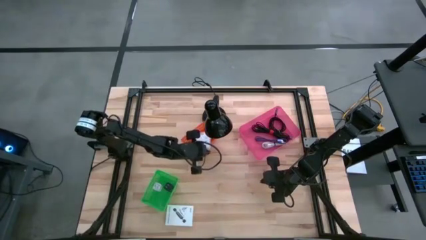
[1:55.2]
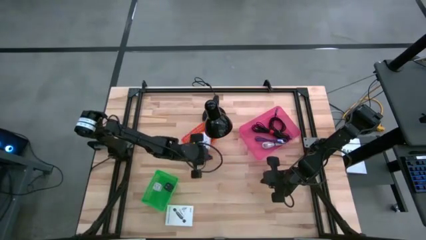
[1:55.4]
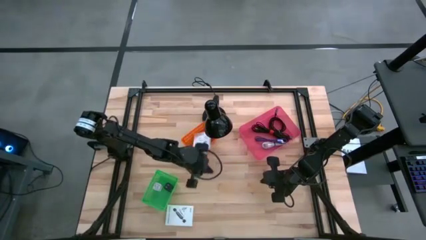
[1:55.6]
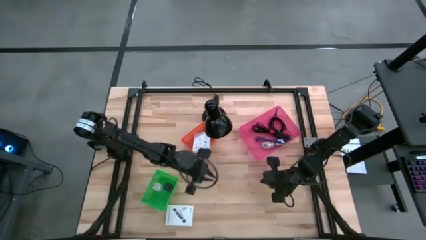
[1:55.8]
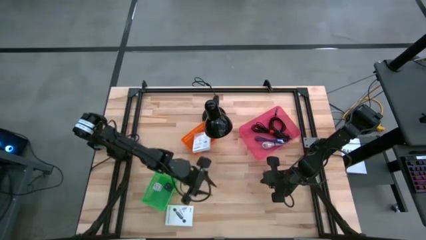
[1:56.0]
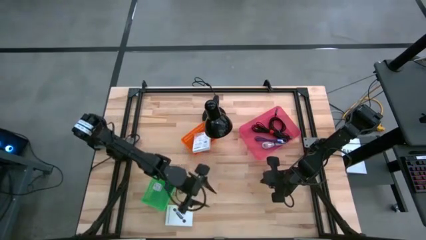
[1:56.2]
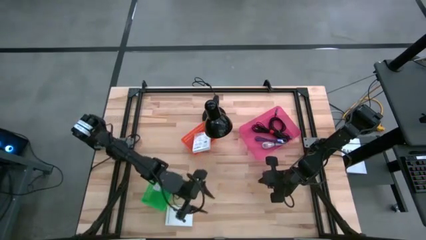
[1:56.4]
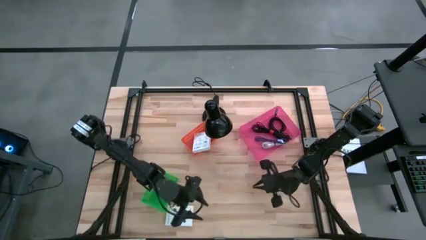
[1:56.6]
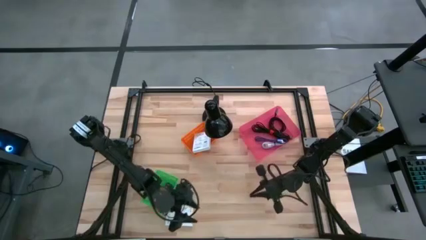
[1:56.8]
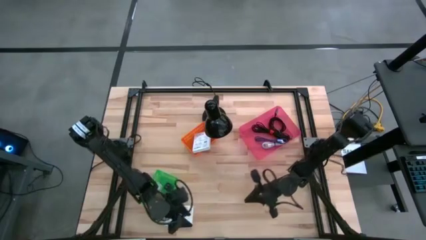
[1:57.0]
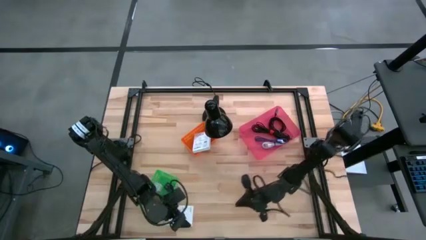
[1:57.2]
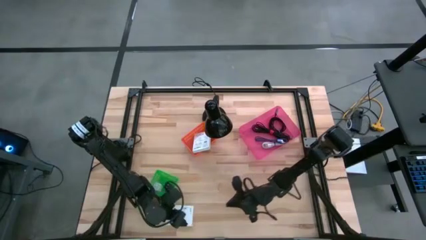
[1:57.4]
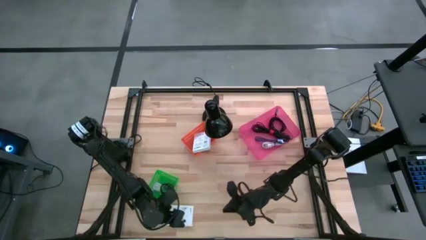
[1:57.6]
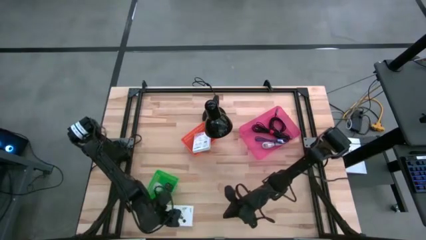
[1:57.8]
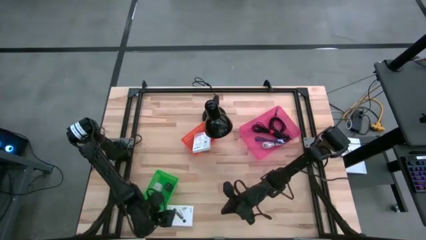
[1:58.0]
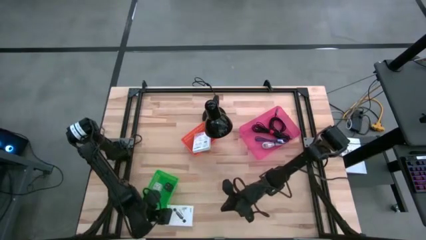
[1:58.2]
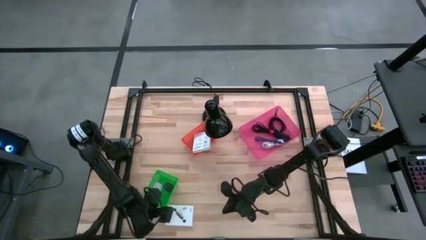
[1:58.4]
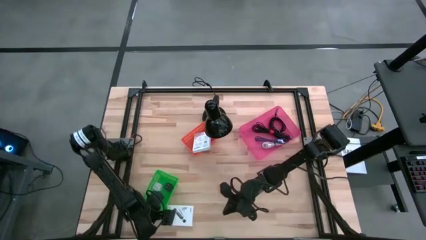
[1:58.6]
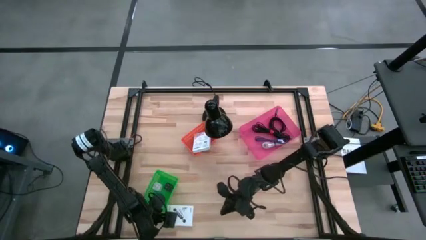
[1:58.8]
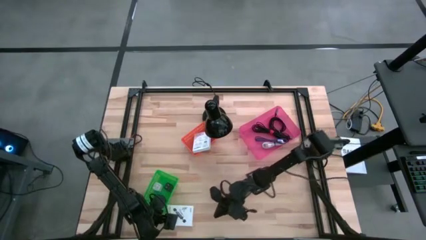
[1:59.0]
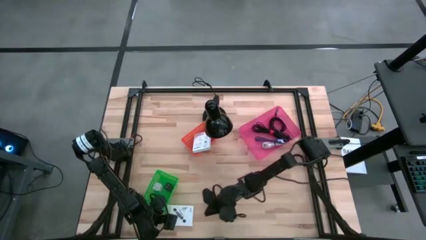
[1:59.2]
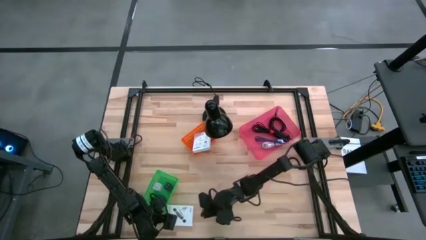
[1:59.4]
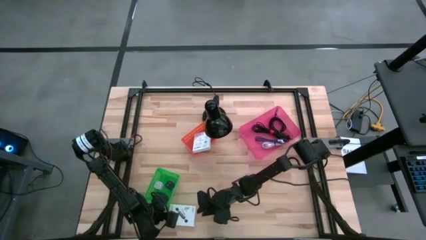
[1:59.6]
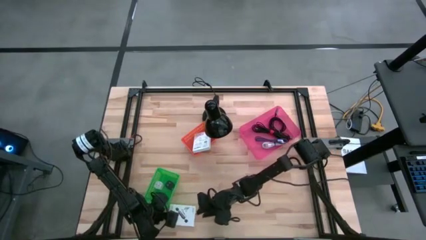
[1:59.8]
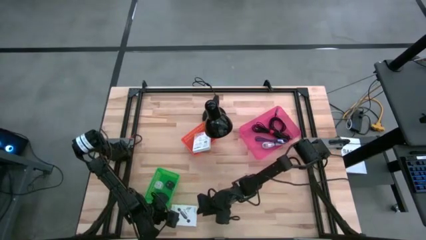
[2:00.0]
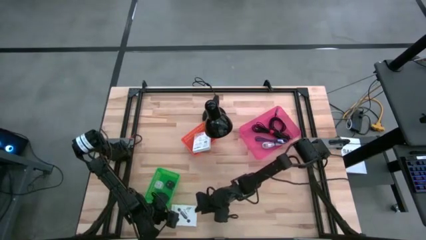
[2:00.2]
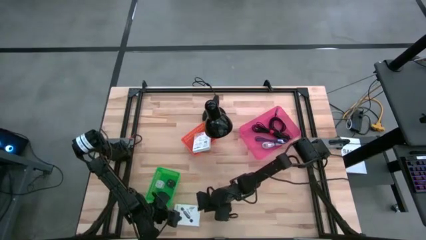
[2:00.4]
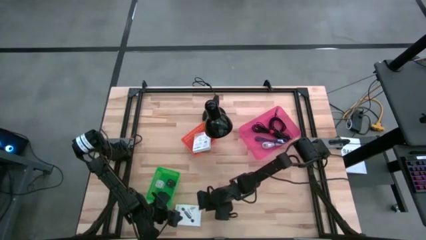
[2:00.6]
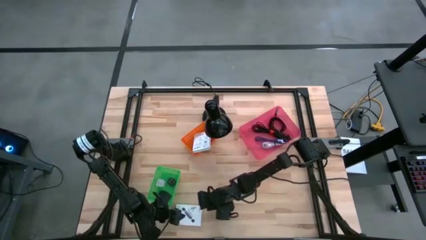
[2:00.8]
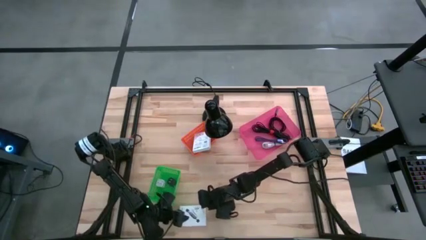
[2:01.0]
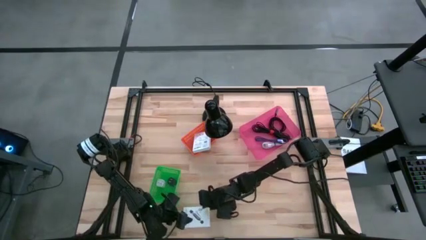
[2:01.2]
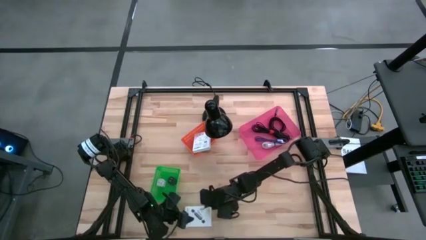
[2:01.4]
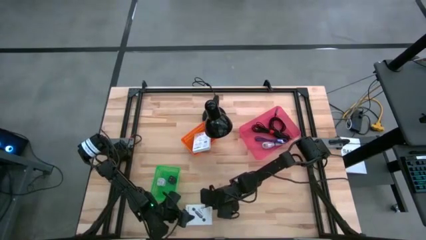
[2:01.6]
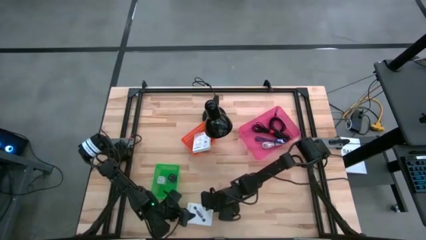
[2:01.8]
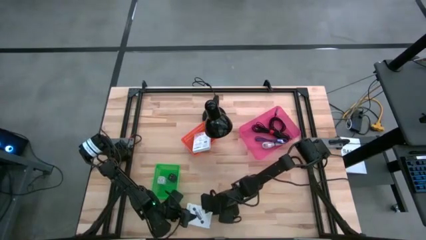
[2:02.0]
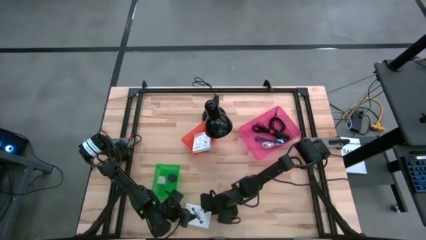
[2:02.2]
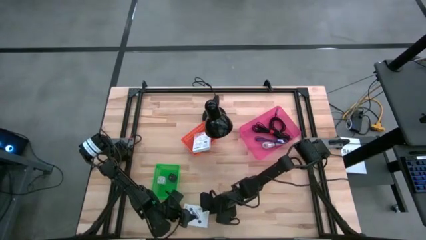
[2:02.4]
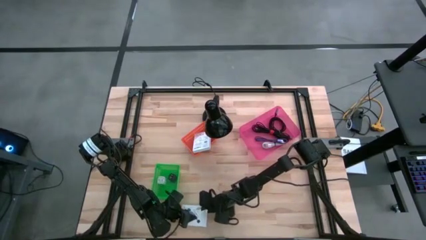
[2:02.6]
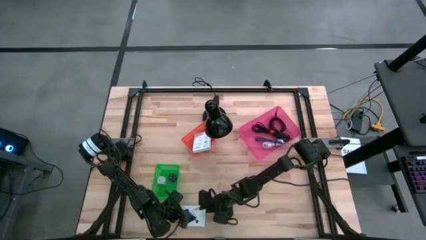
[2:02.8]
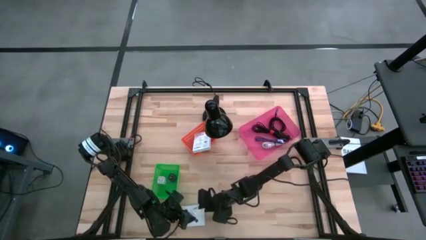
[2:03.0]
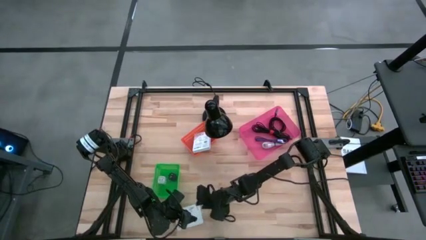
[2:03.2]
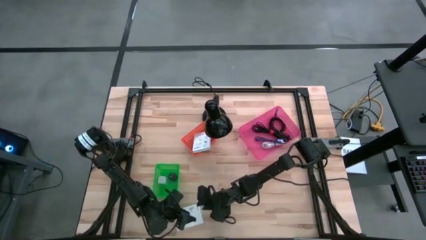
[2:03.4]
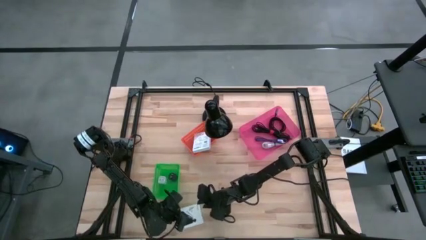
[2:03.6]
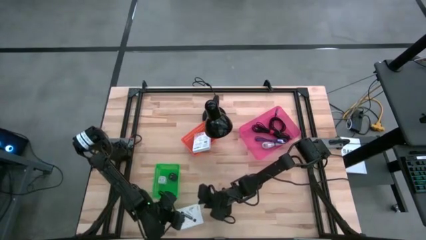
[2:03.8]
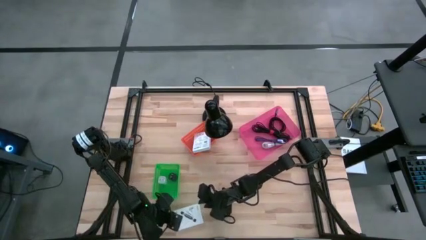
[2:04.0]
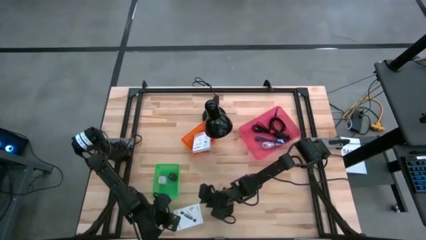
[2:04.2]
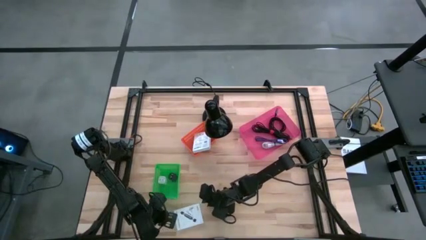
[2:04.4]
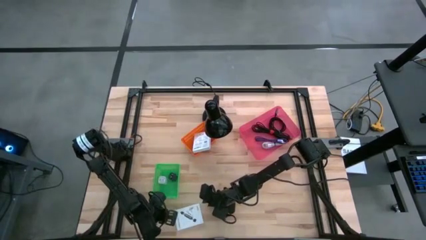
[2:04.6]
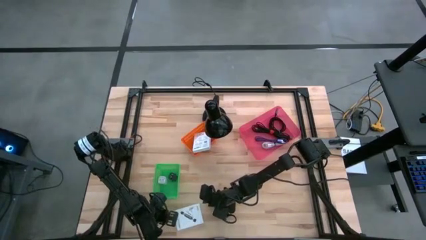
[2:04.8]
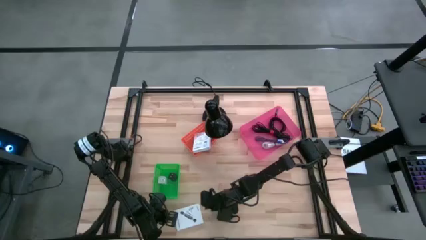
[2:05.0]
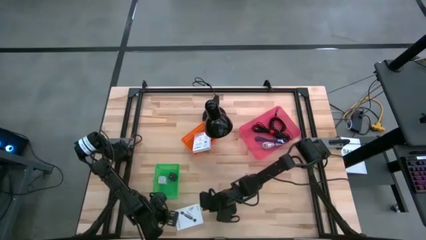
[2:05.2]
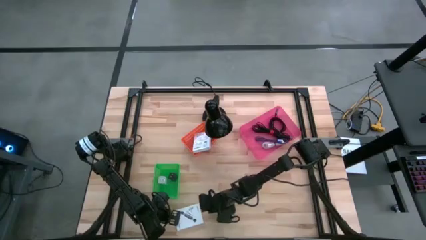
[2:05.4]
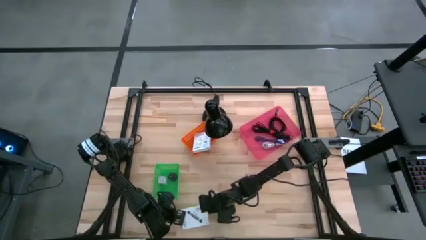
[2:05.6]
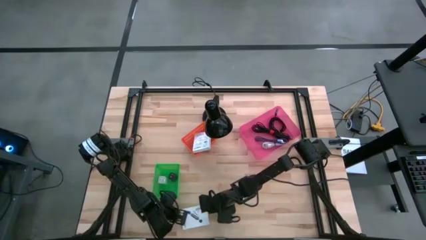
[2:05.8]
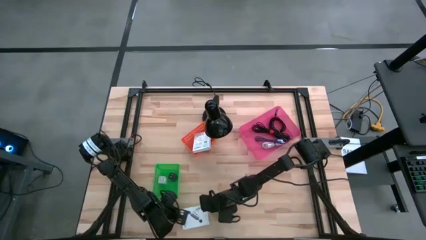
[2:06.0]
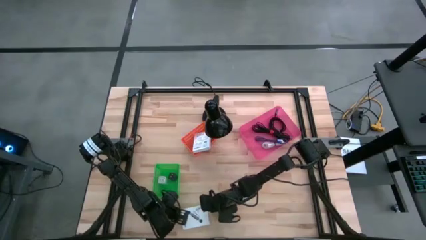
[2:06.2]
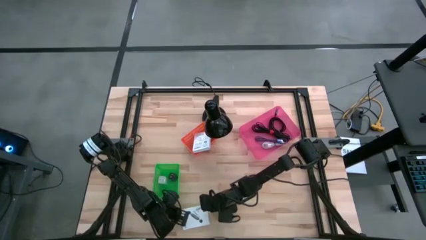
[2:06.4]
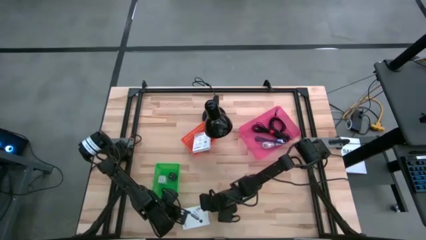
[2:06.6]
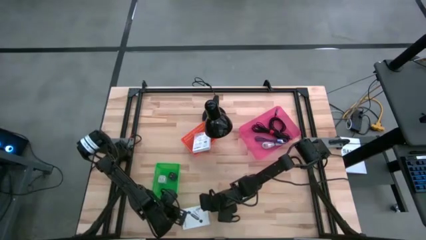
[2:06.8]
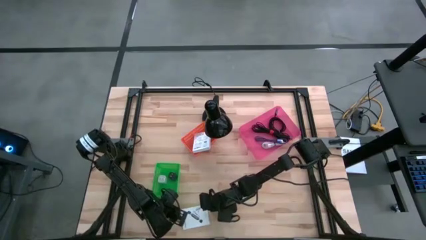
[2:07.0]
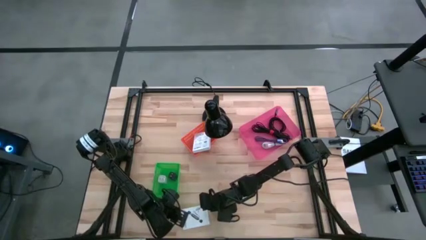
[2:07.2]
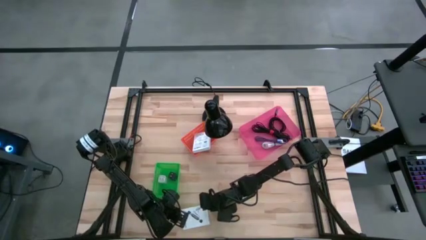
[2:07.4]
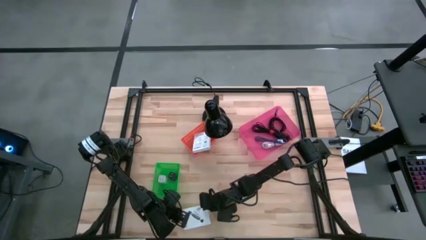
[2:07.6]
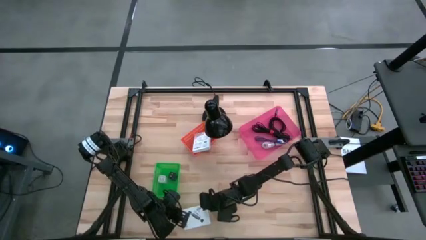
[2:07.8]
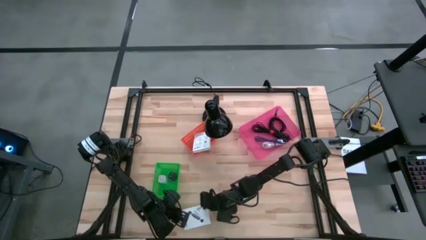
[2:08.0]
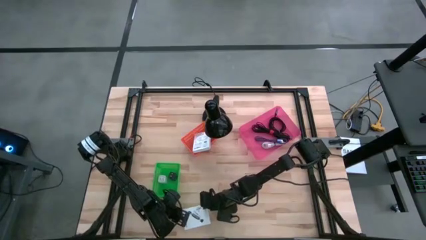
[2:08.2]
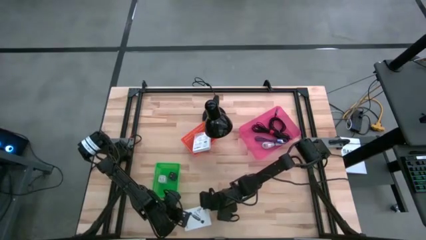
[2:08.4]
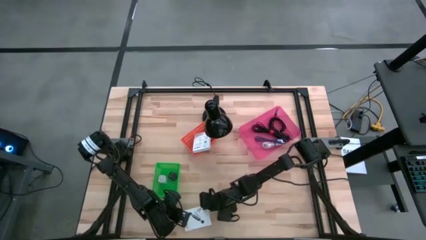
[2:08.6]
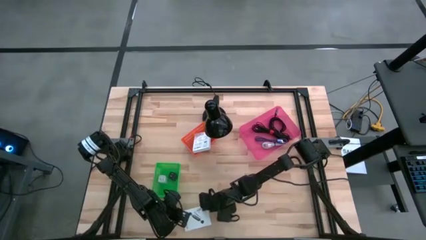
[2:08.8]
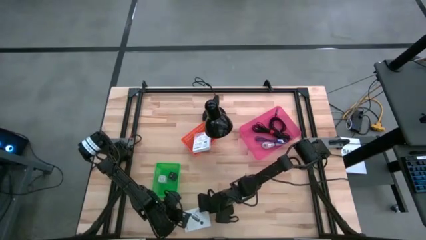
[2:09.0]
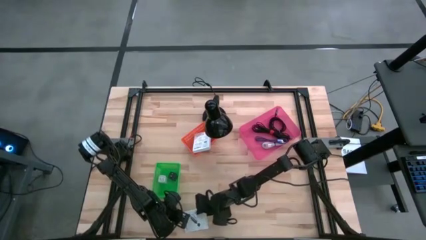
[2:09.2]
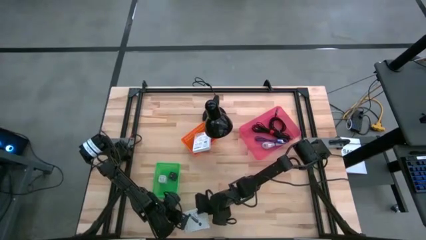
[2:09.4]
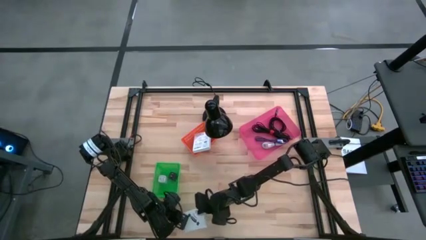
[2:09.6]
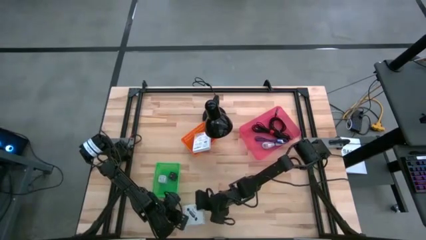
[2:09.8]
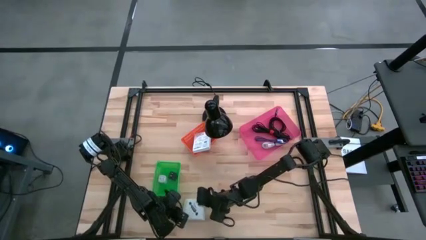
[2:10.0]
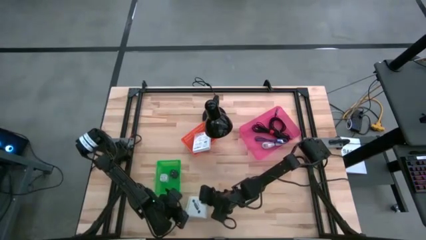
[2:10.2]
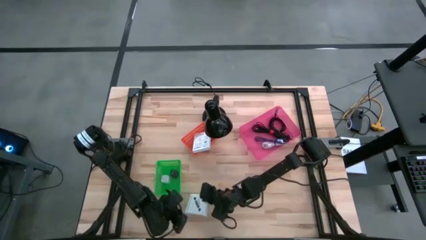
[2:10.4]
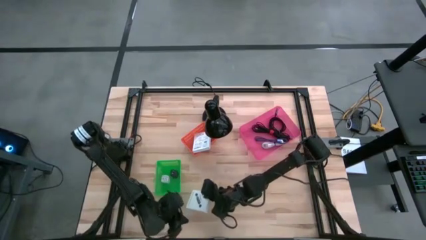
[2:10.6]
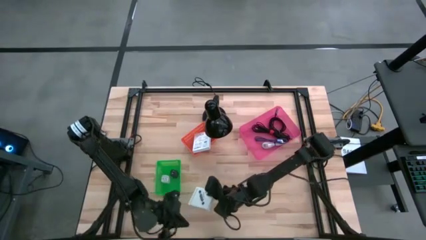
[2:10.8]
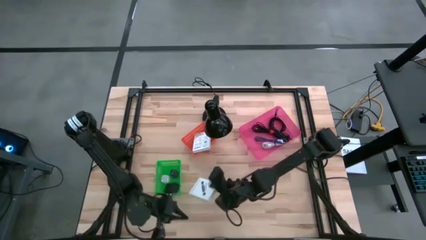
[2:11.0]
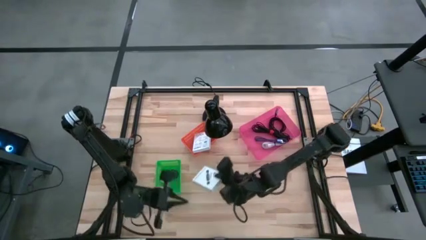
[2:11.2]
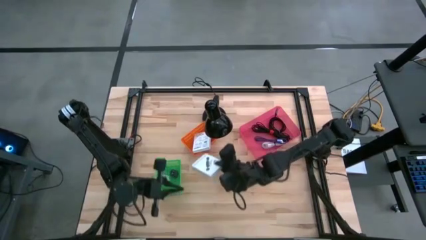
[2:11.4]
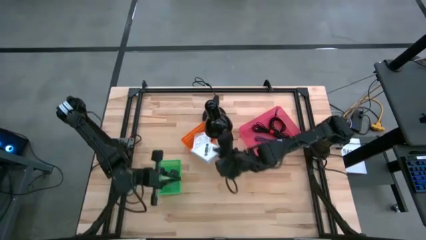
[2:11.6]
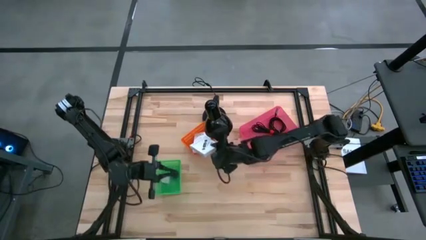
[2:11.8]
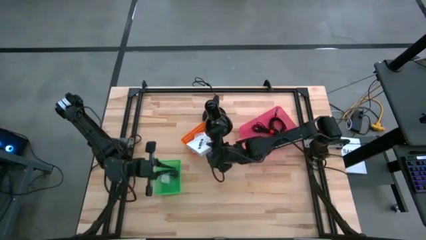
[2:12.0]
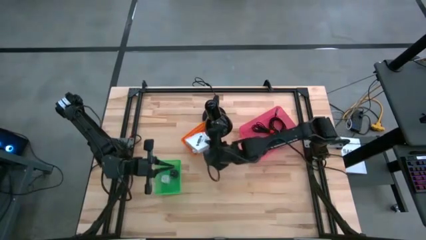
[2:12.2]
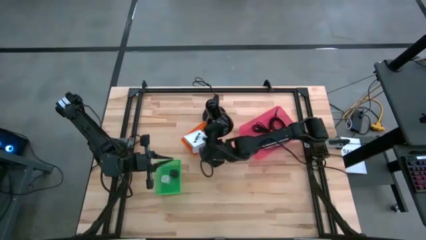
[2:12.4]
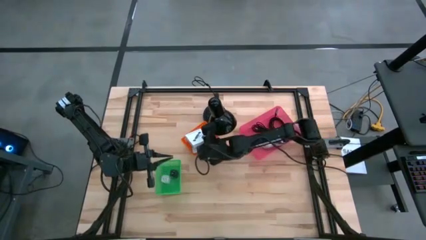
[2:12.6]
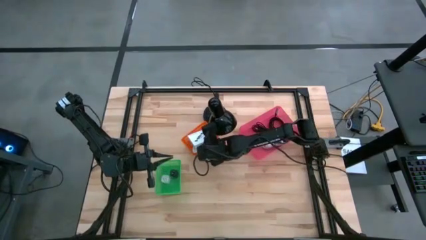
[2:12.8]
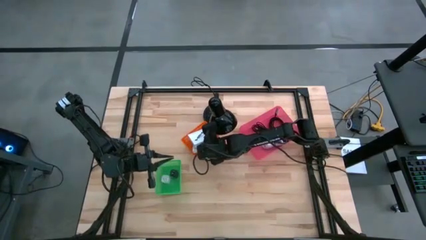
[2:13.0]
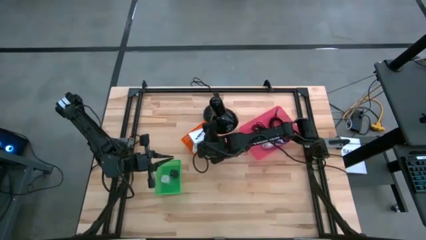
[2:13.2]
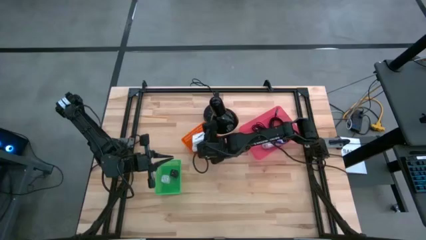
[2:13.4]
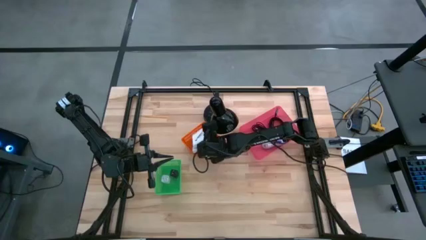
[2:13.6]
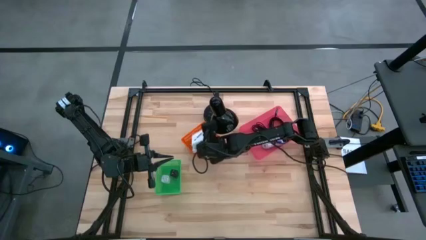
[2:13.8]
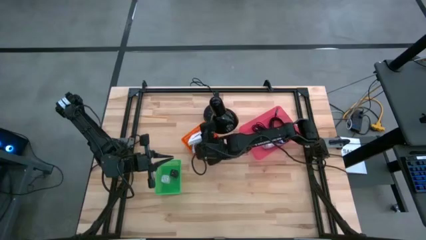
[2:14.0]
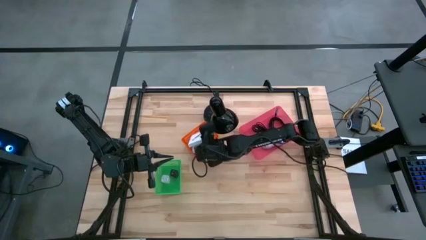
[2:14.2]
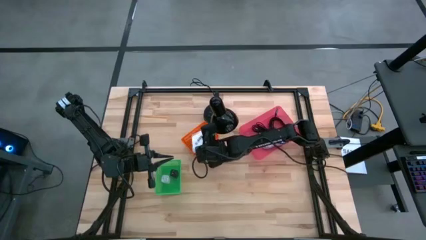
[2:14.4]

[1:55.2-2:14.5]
Task: Pick and place items into bin
Put the white card reader box into the orange bin
